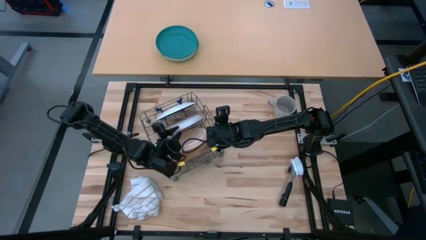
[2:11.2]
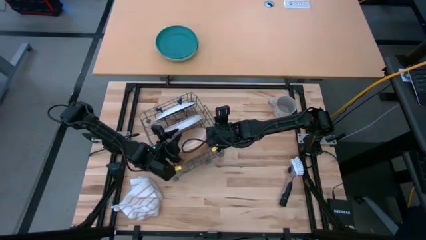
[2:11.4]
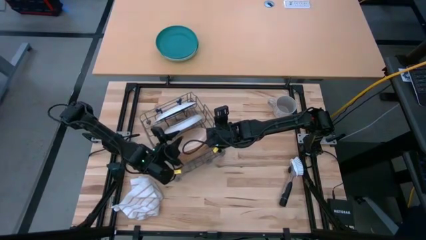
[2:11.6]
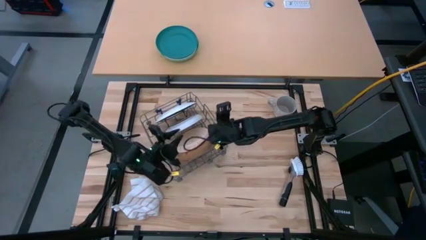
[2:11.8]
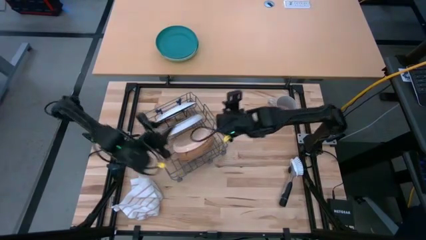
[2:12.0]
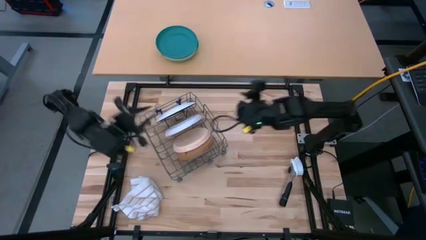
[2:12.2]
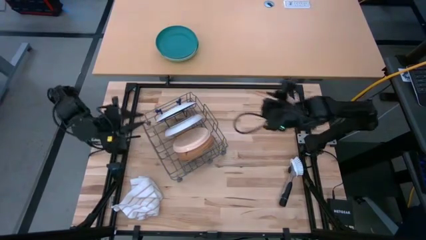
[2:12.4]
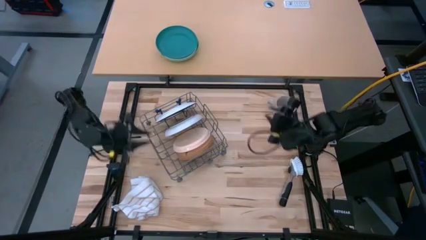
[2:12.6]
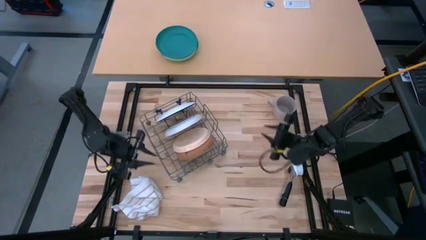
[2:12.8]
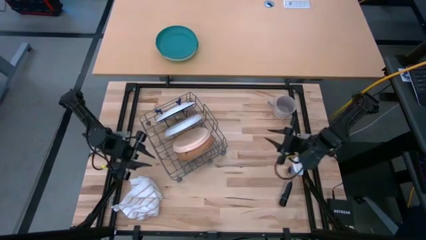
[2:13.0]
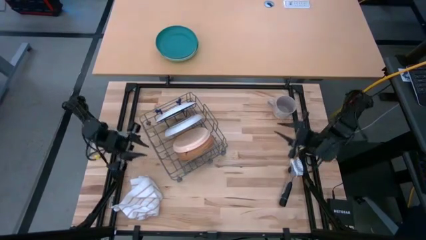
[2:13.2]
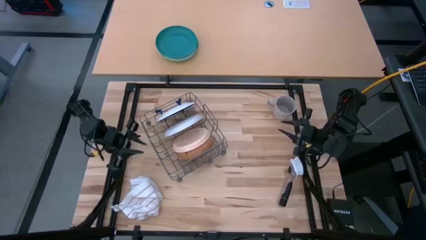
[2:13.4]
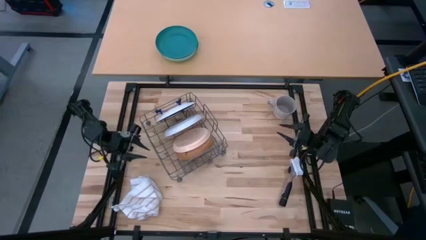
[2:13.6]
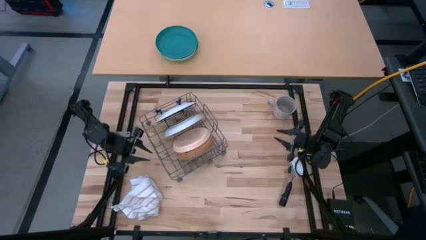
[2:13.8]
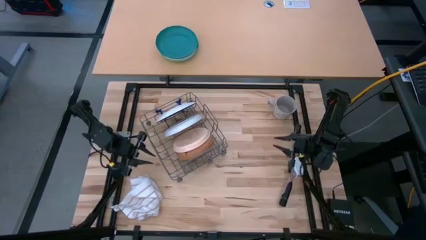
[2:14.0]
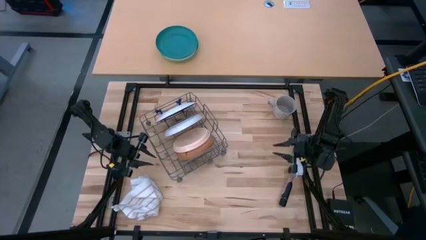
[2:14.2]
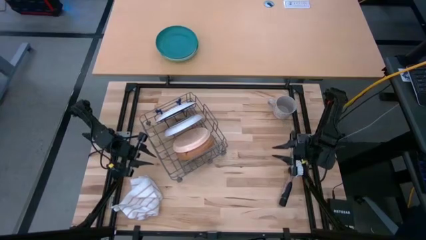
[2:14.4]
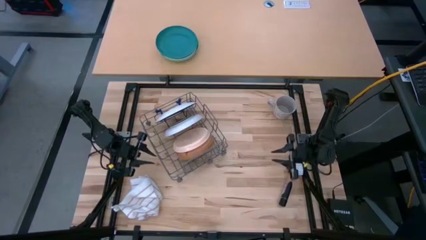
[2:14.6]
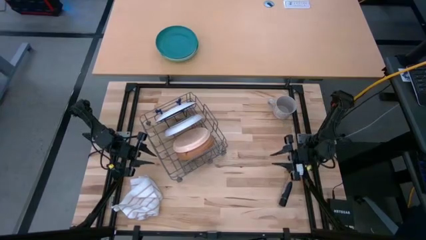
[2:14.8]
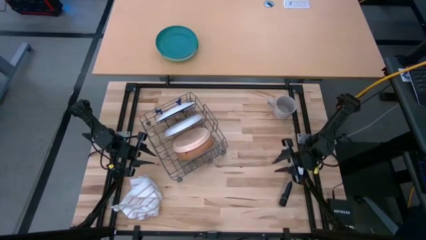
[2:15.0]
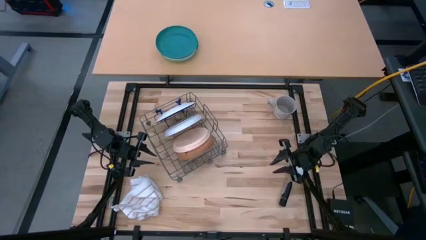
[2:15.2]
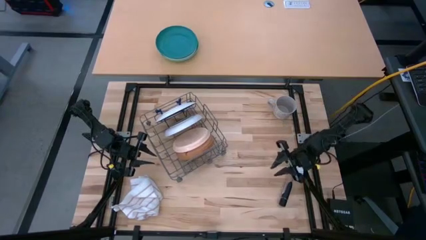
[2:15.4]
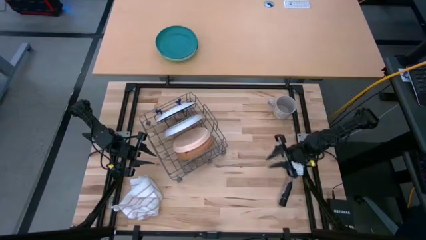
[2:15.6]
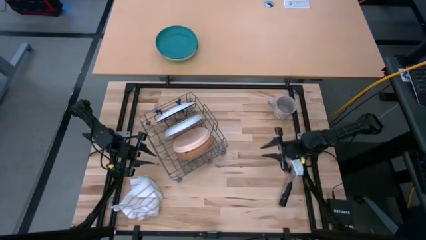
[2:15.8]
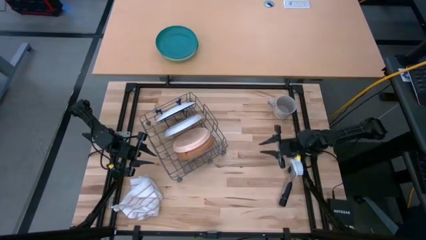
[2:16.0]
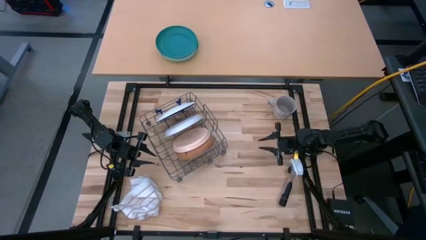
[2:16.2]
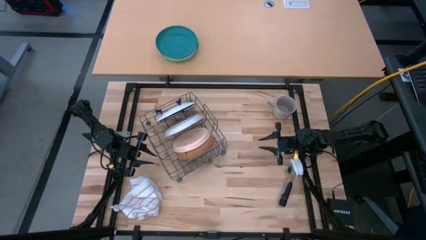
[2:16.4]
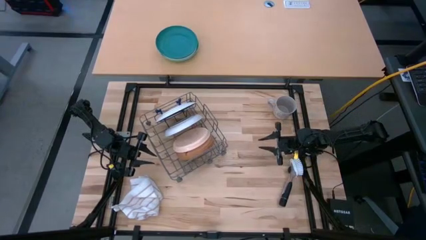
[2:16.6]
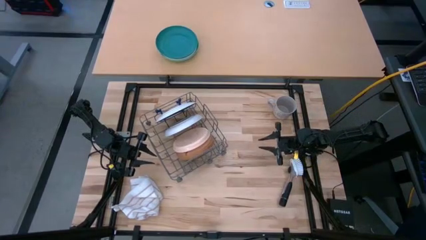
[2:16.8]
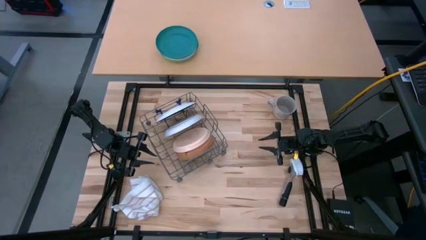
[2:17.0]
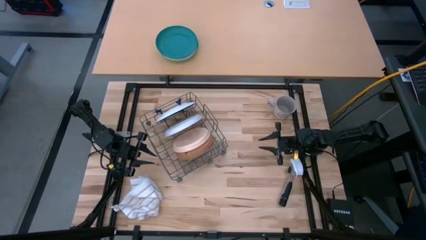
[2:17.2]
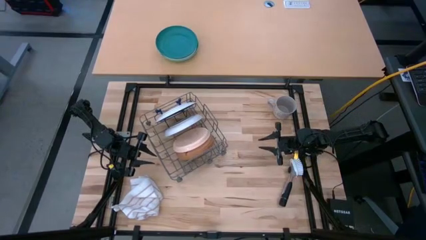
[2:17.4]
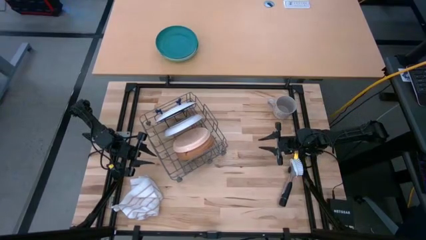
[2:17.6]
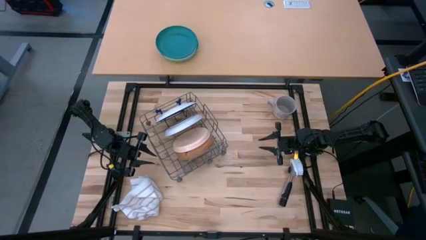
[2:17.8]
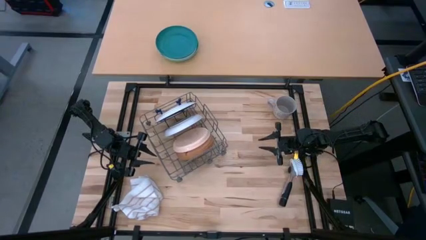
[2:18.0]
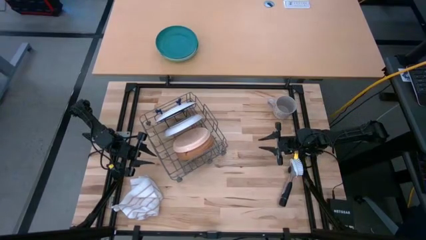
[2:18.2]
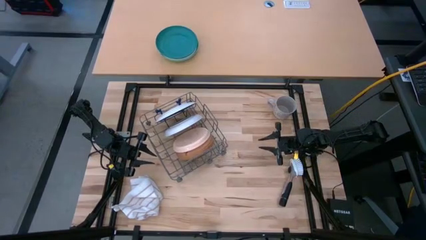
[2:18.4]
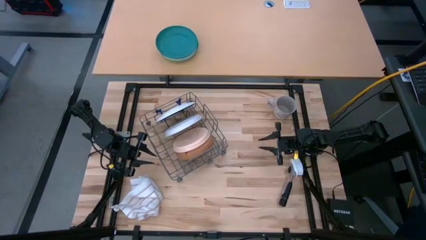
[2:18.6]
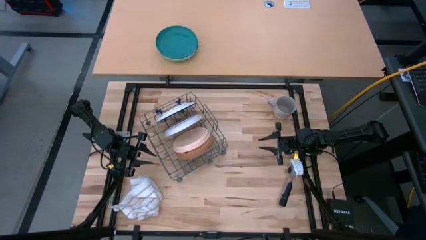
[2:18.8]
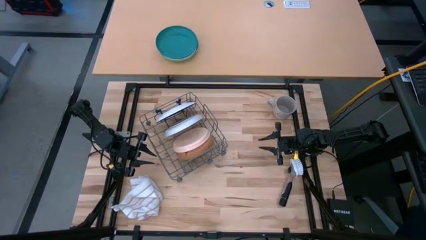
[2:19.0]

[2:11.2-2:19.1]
Task: Sort dishes
Return to Home Position

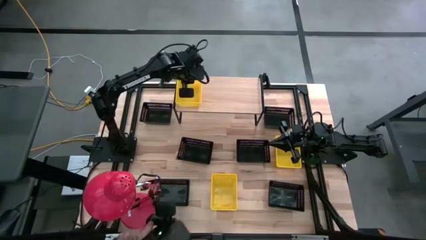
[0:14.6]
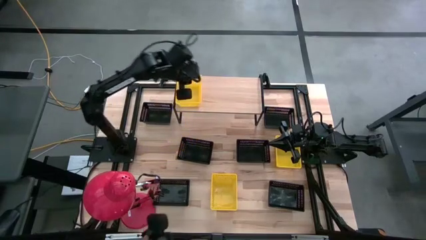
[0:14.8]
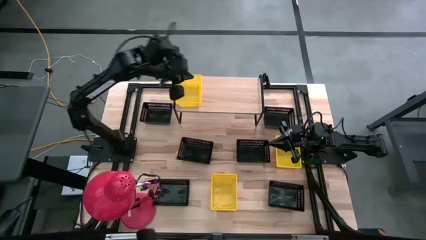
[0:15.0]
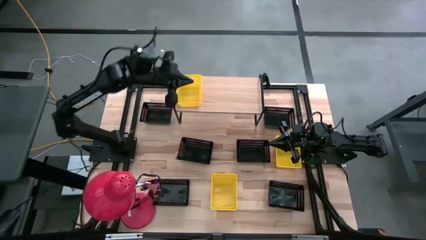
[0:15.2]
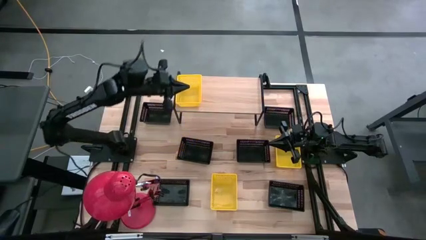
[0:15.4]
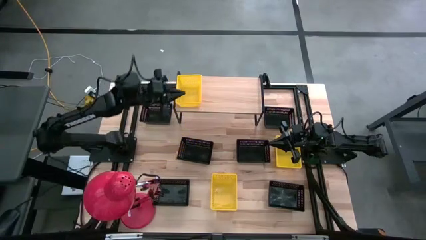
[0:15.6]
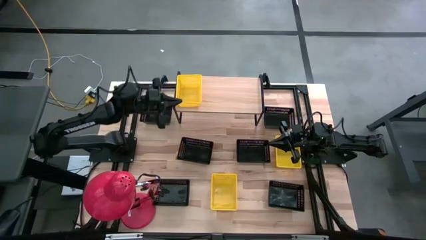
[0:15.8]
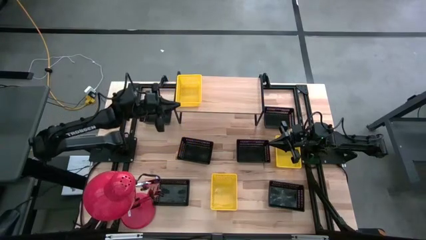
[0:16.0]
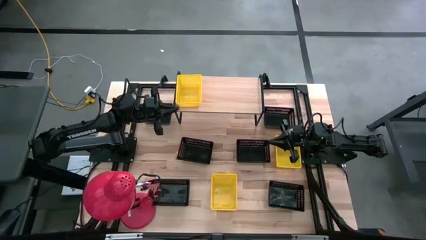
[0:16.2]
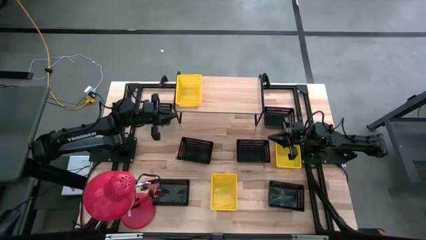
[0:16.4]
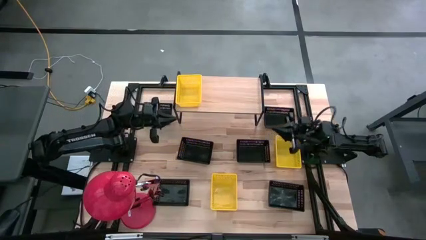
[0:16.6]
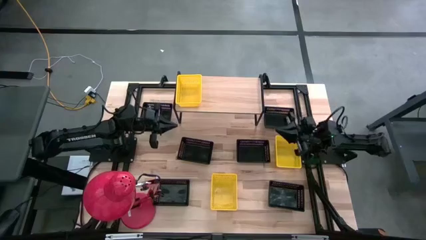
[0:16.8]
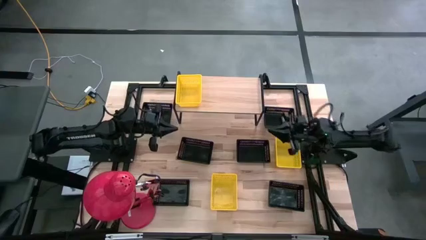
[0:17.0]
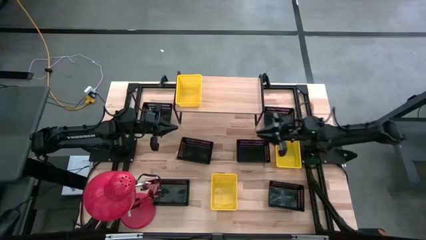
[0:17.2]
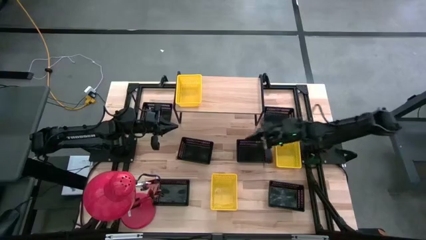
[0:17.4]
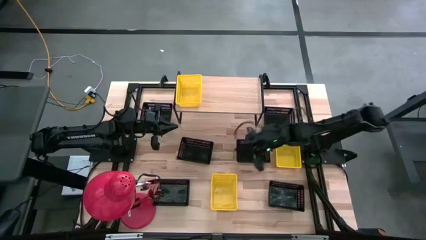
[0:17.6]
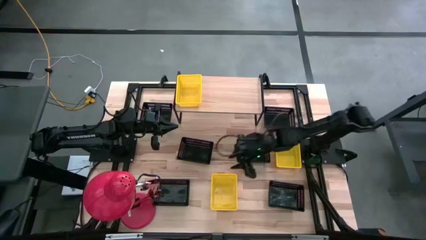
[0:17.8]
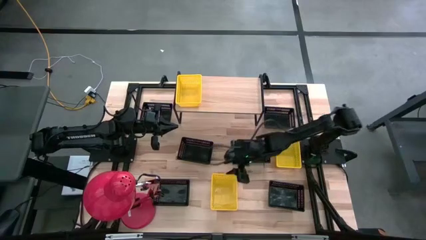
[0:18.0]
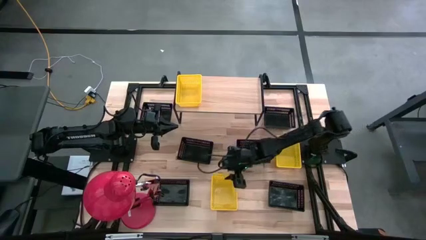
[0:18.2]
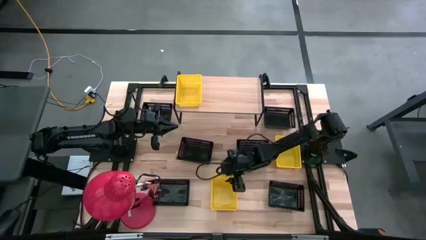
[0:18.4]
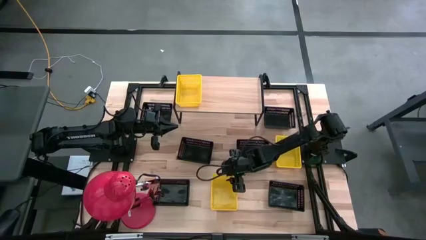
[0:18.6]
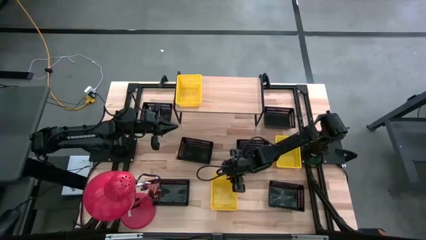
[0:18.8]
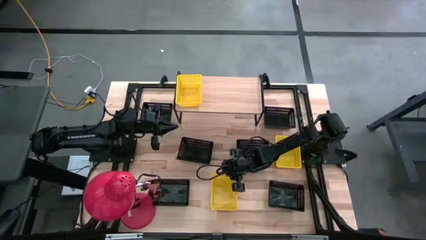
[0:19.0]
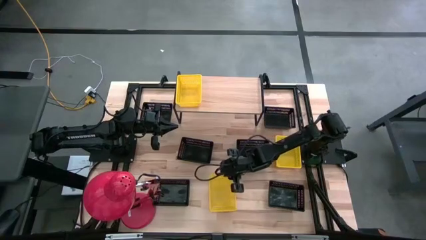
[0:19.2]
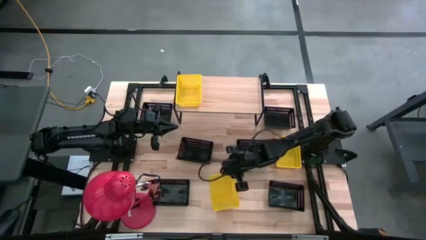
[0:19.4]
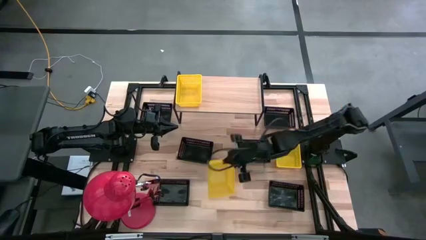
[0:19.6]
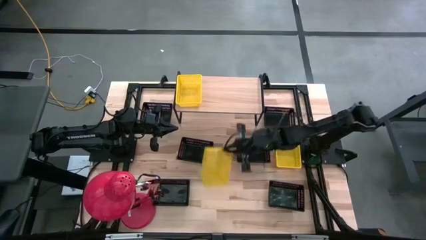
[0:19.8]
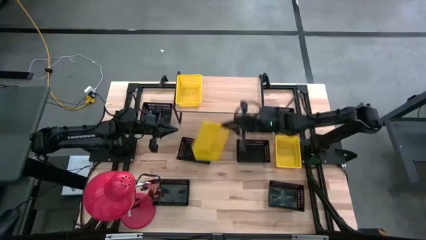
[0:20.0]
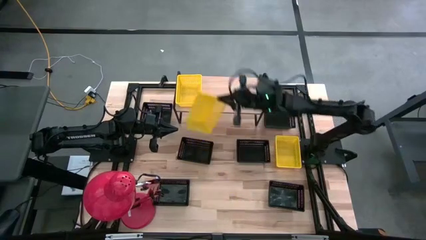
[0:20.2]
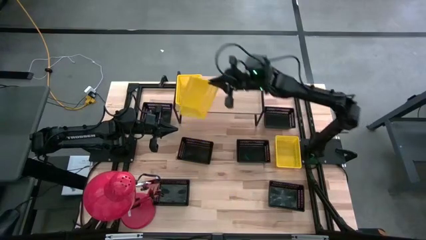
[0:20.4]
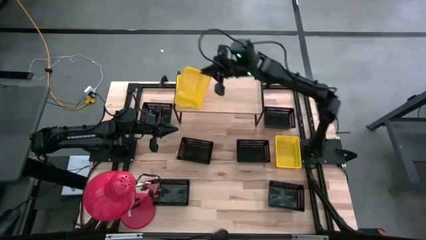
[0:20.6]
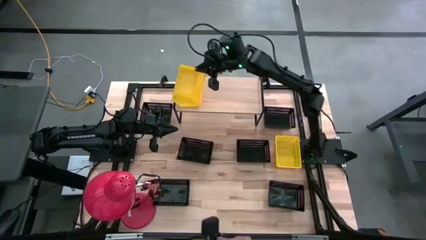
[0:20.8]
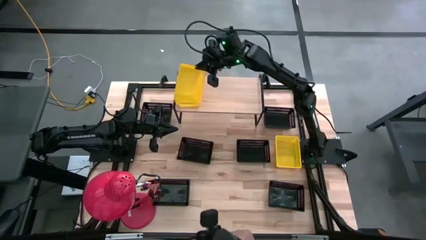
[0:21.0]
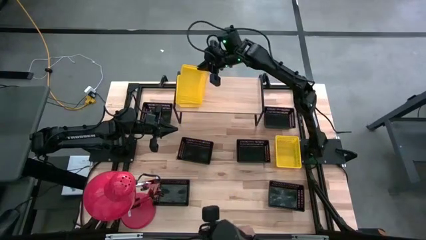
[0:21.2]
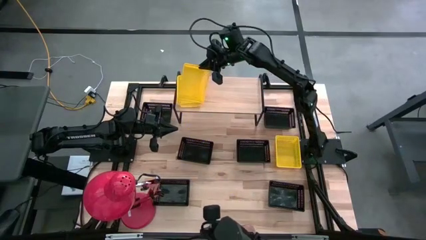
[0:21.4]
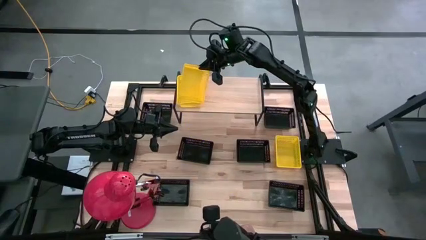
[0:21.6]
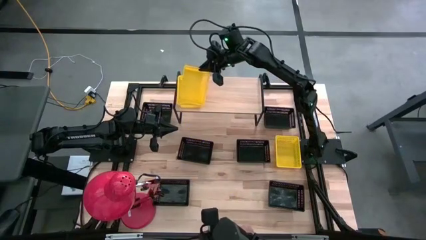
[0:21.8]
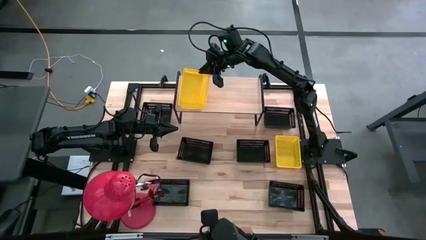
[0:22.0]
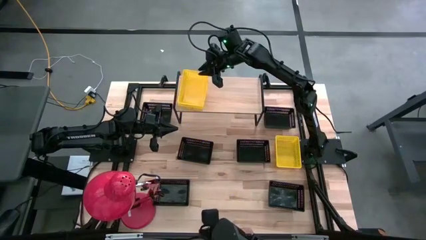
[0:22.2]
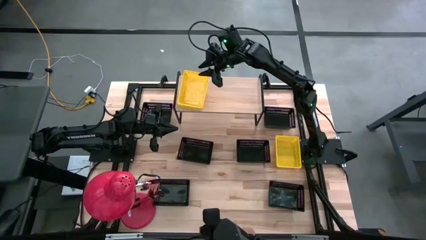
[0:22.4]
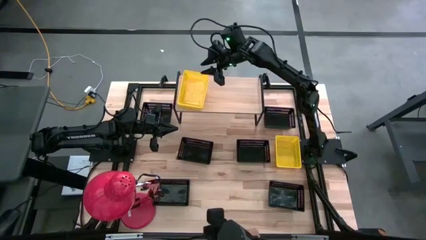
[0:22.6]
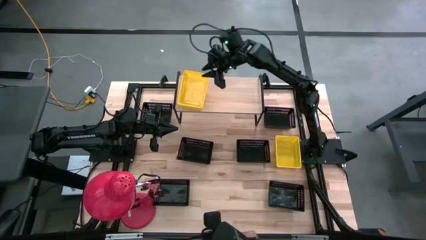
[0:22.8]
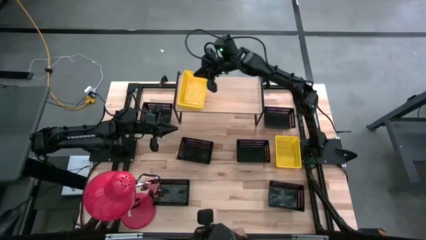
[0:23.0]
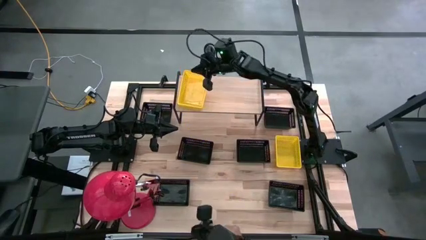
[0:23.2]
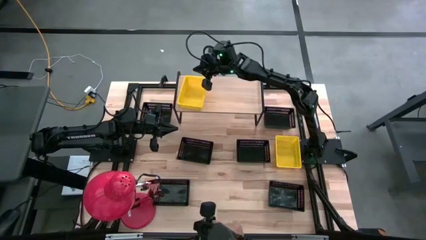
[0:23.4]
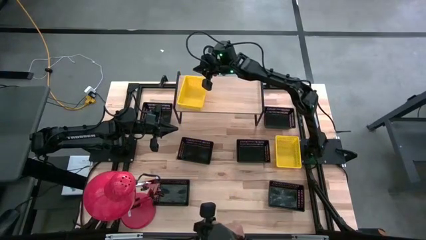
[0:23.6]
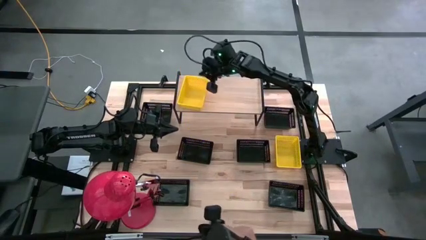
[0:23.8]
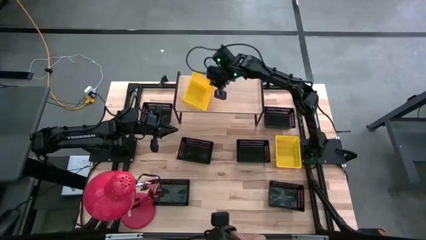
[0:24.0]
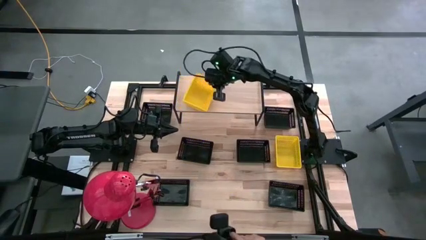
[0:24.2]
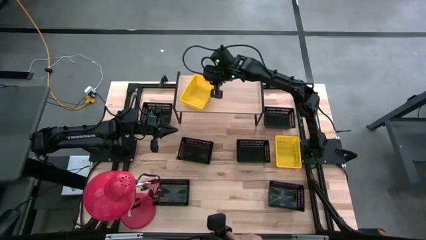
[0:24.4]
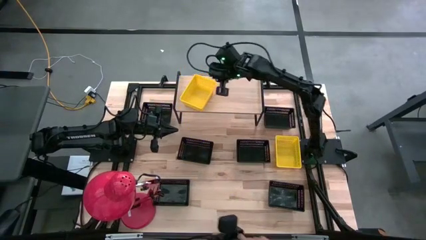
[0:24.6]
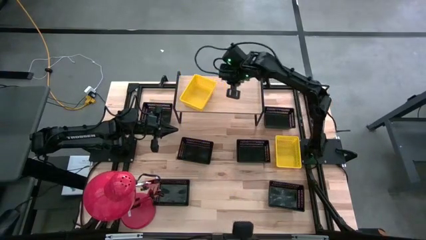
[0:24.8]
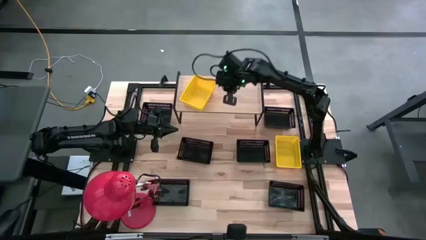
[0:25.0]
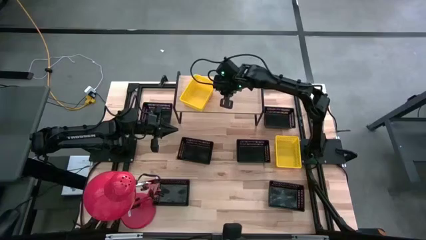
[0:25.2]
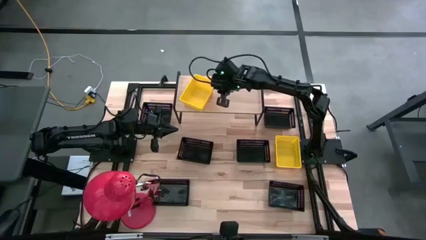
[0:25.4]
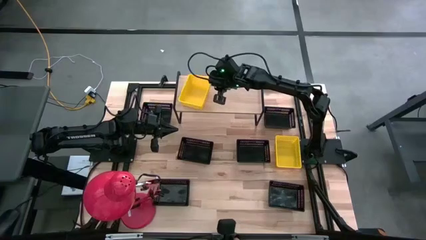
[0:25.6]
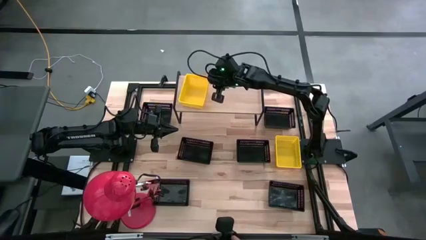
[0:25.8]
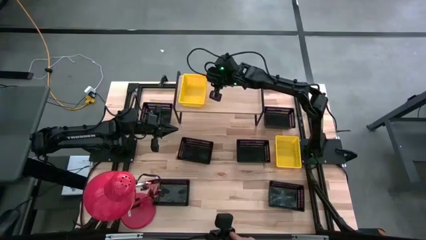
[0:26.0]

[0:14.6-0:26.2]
Task: Stack baskets on shelf by color
Stack the bottom yellow bin on the yellow bin on the shelf
